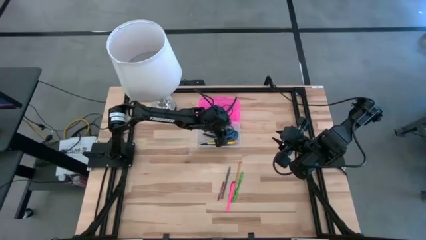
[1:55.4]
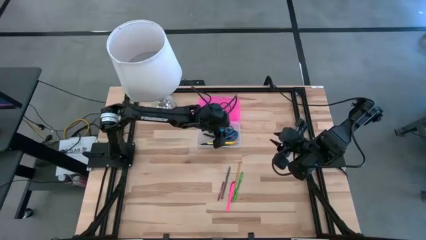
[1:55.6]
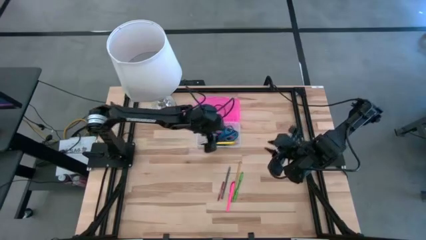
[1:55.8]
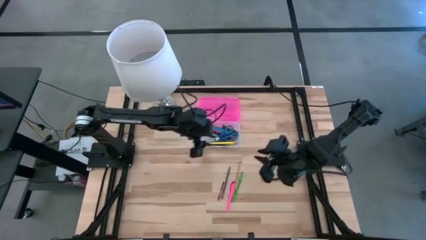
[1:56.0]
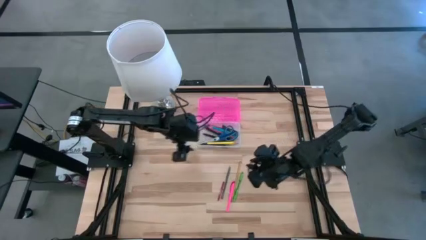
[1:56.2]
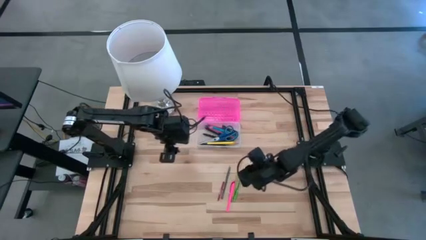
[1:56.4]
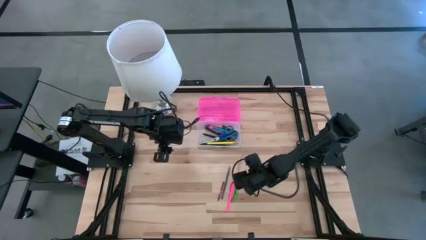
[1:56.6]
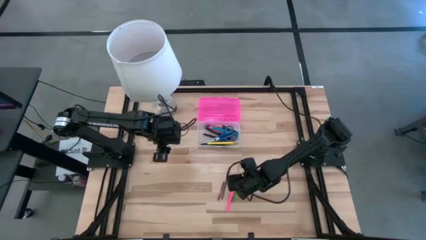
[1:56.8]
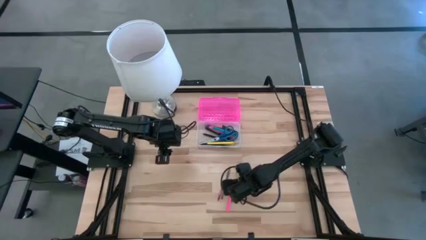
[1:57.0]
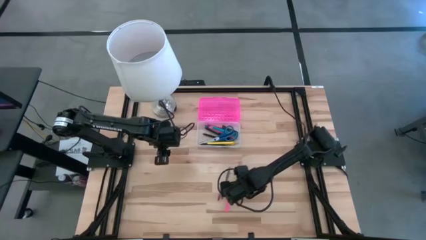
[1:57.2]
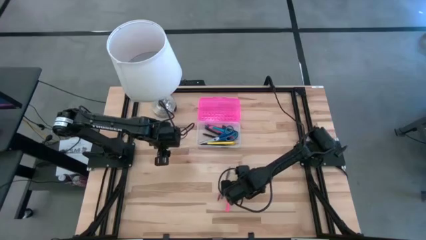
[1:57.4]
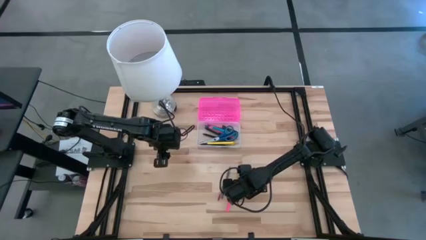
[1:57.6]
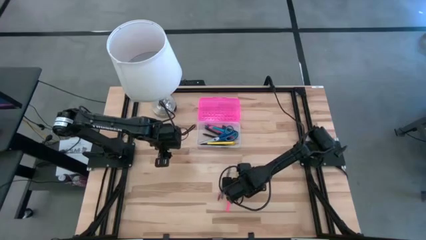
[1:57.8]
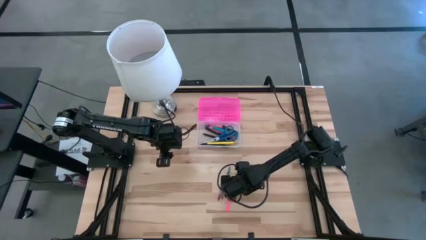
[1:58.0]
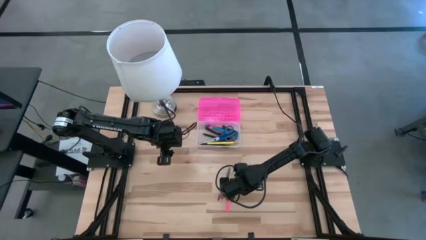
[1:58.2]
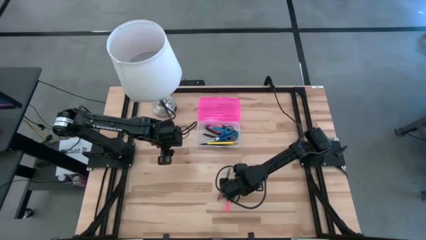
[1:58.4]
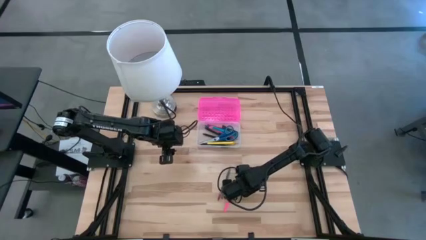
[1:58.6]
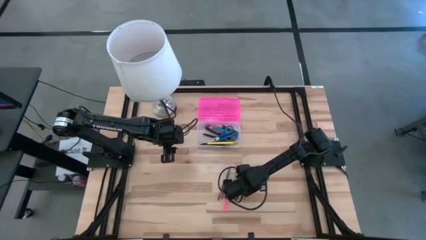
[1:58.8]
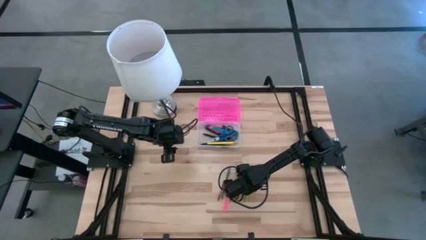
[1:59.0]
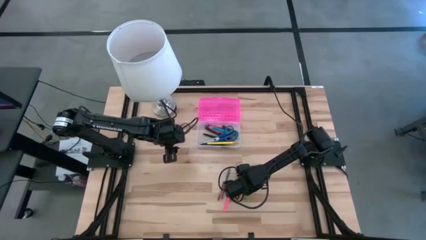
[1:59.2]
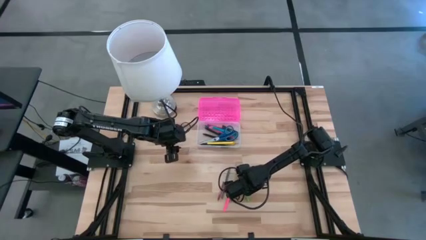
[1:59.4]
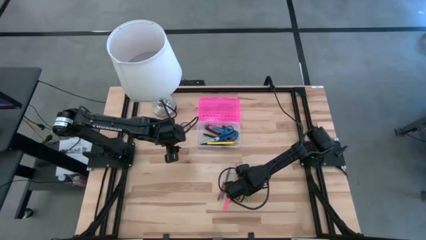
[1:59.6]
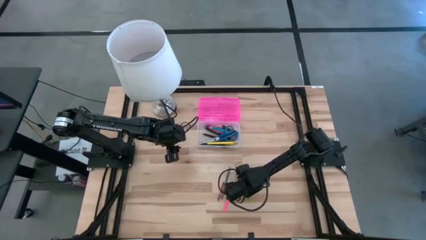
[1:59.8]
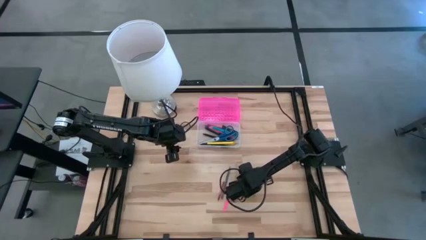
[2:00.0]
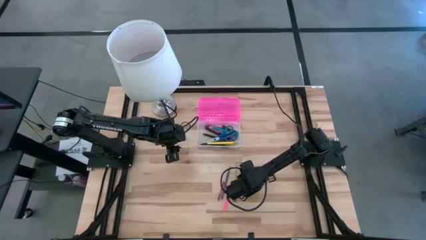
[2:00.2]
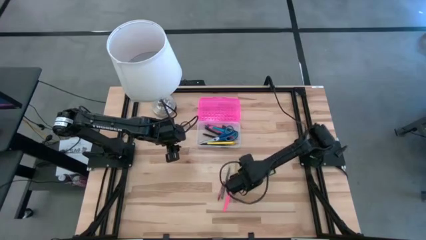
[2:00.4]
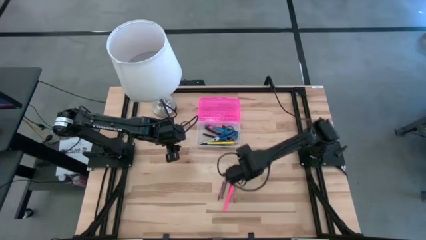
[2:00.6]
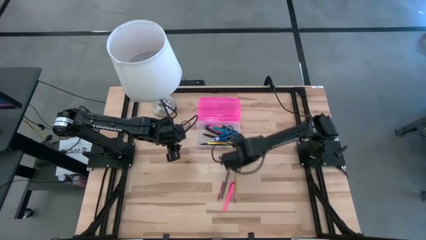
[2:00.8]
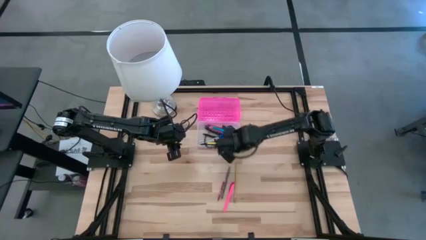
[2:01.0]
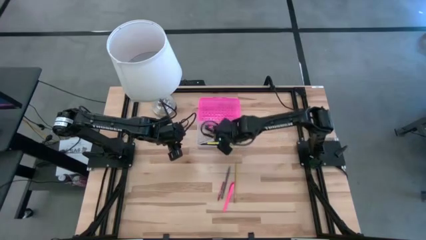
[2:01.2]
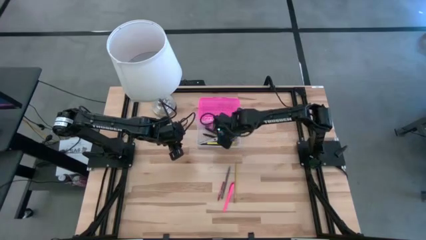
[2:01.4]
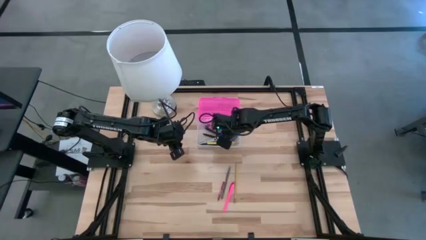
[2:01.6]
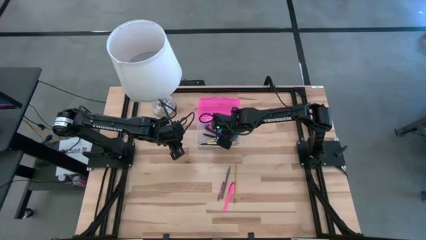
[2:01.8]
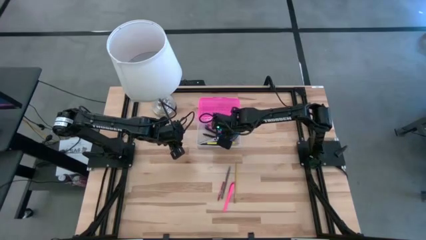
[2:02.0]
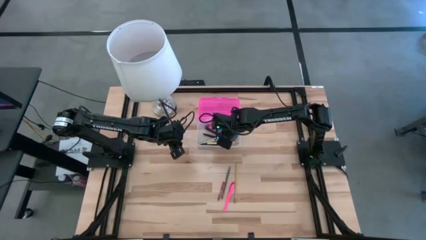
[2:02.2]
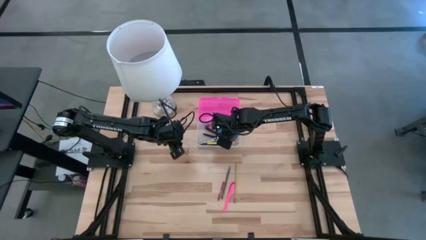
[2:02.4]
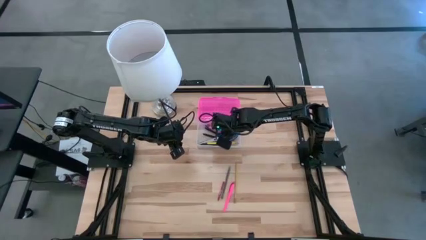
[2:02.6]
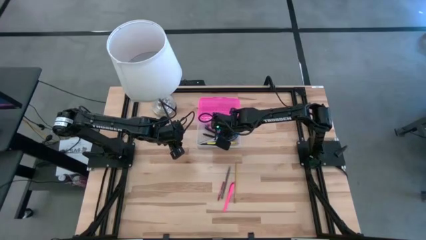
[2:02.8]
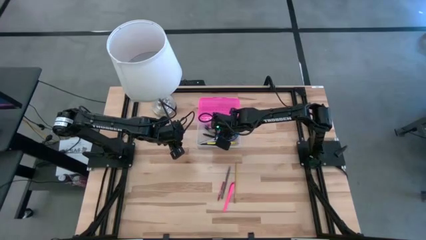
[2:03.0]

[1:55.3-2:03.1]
Task: Pick & place school supplies into a supply box
Put the green pen into the pink supply box

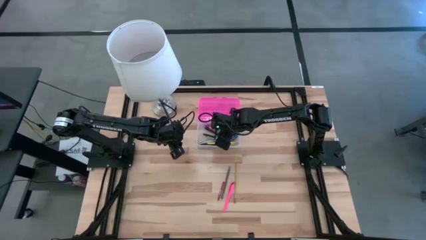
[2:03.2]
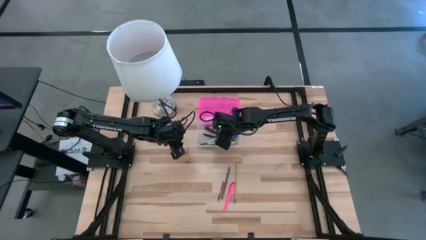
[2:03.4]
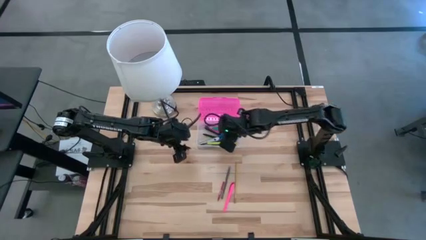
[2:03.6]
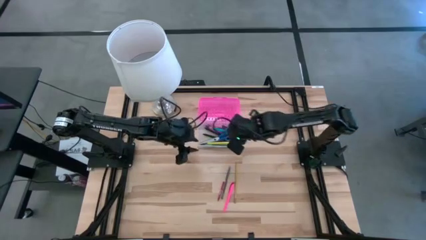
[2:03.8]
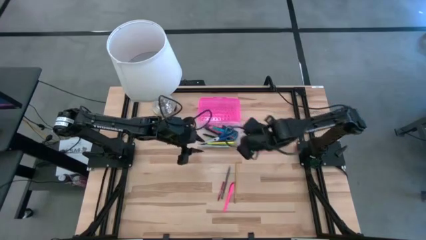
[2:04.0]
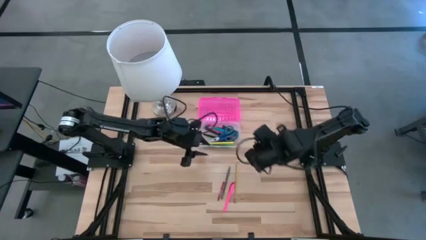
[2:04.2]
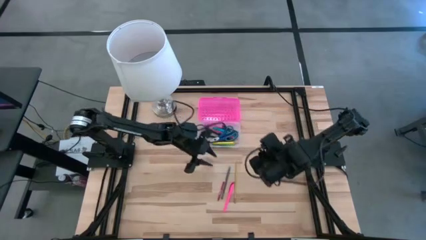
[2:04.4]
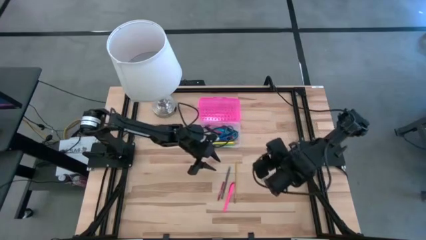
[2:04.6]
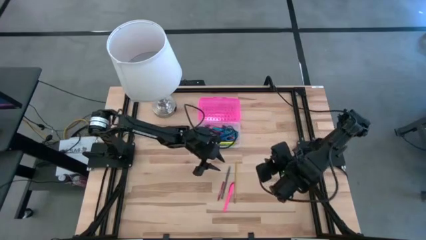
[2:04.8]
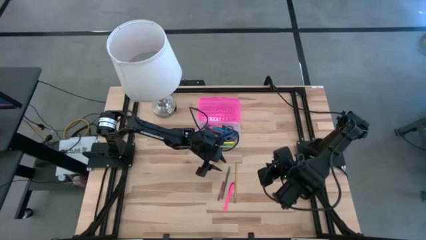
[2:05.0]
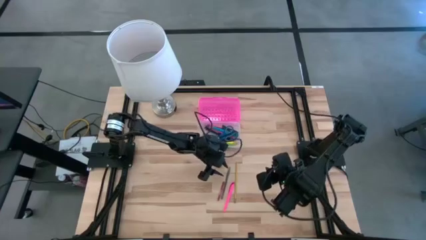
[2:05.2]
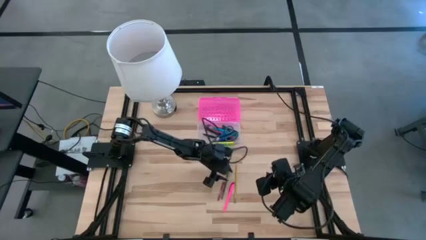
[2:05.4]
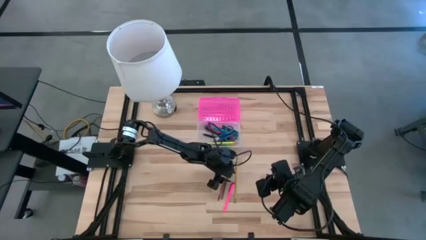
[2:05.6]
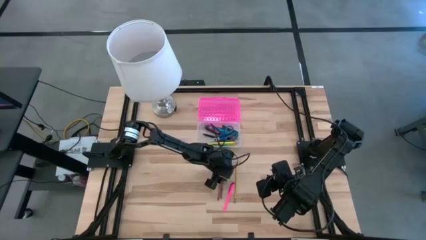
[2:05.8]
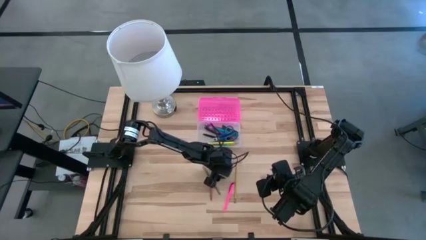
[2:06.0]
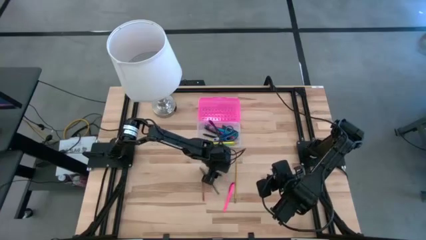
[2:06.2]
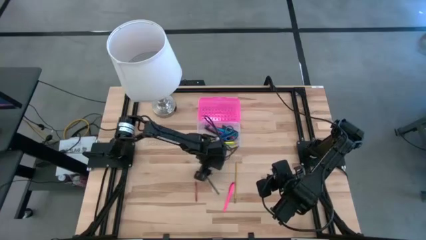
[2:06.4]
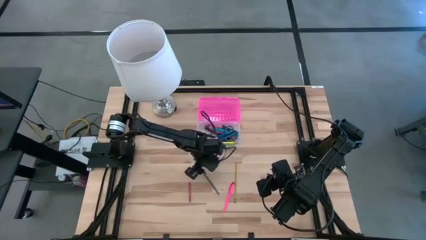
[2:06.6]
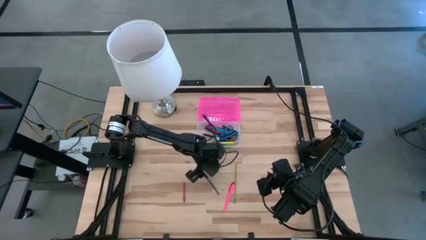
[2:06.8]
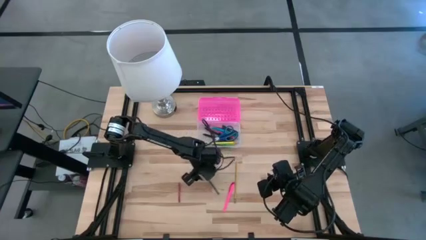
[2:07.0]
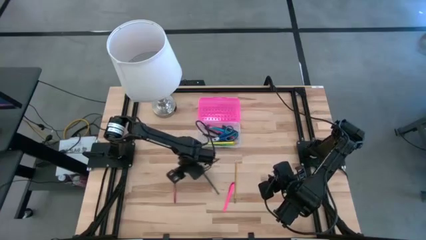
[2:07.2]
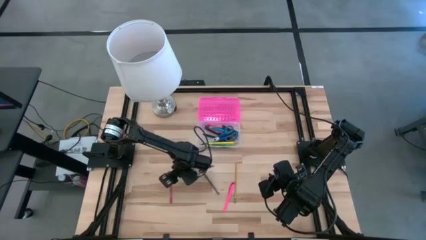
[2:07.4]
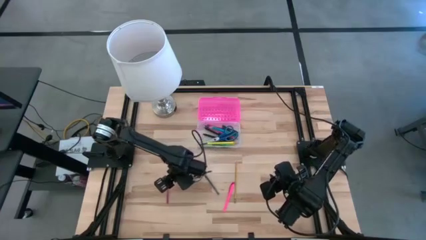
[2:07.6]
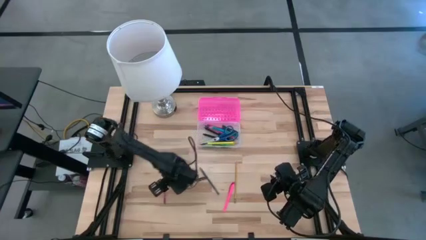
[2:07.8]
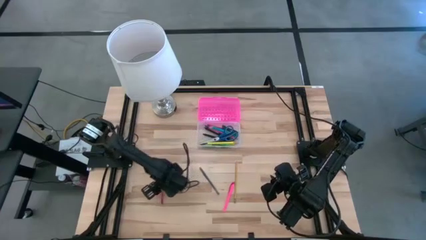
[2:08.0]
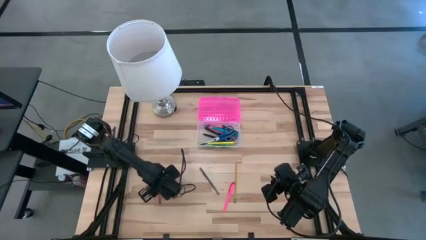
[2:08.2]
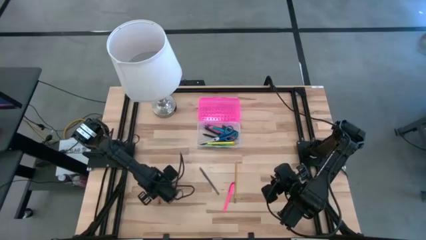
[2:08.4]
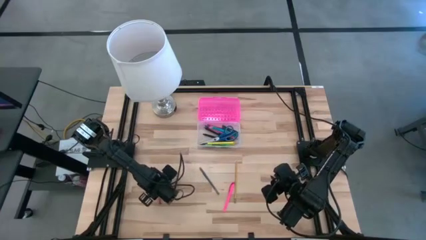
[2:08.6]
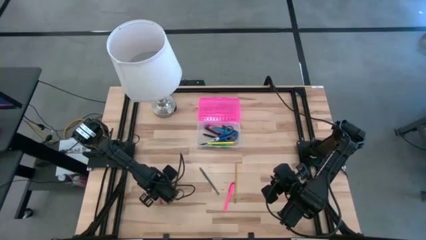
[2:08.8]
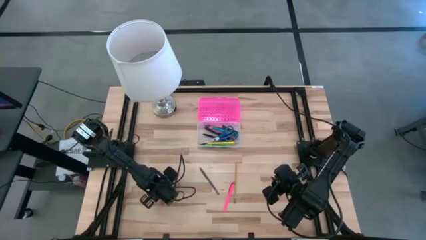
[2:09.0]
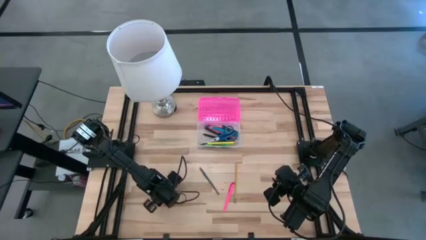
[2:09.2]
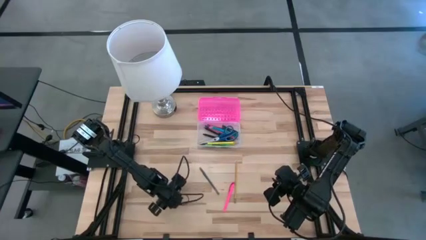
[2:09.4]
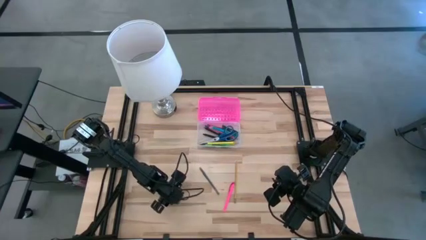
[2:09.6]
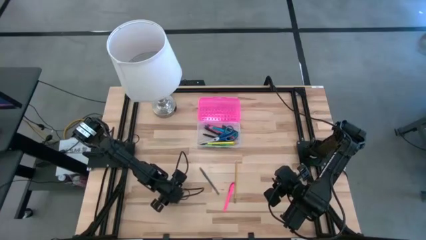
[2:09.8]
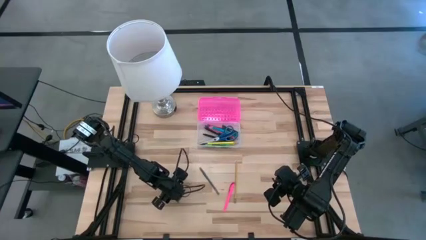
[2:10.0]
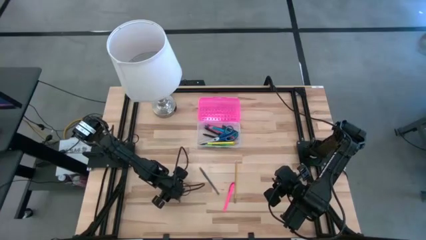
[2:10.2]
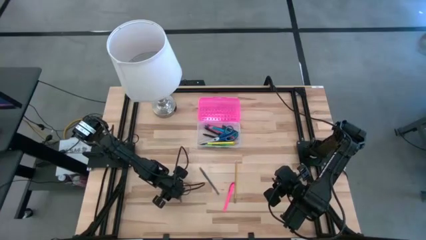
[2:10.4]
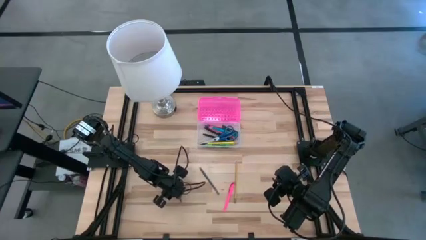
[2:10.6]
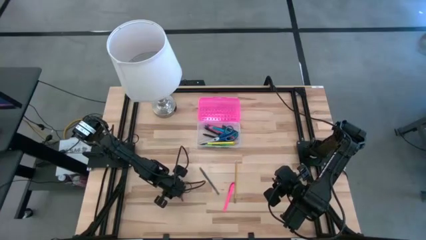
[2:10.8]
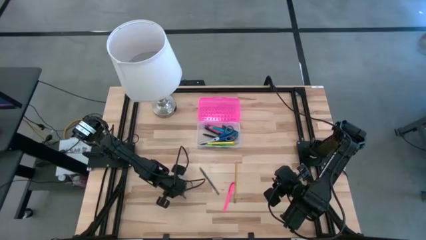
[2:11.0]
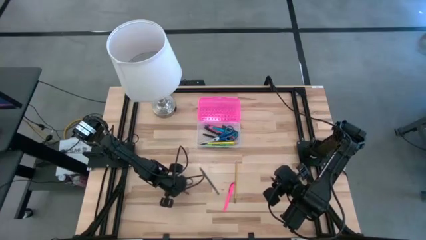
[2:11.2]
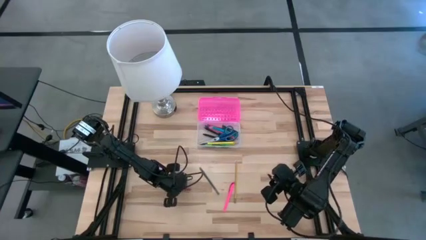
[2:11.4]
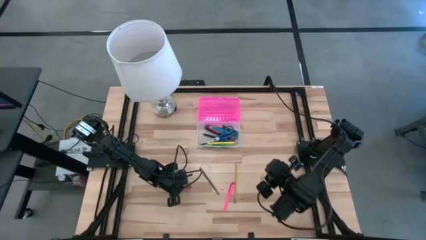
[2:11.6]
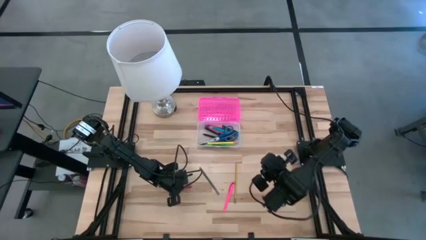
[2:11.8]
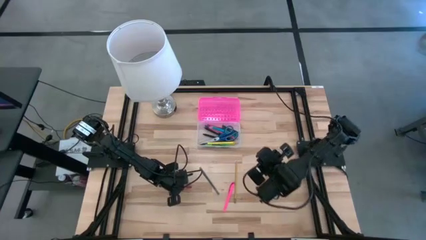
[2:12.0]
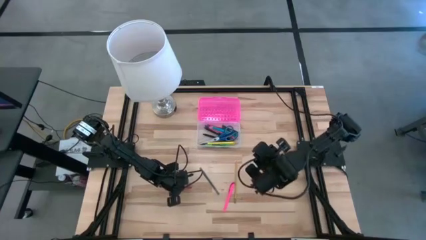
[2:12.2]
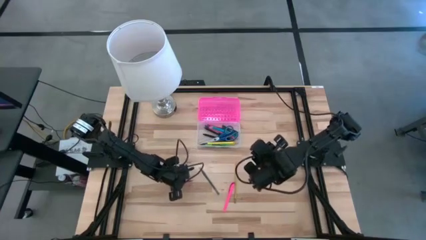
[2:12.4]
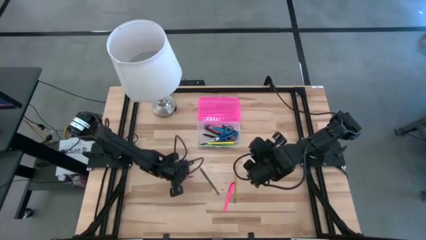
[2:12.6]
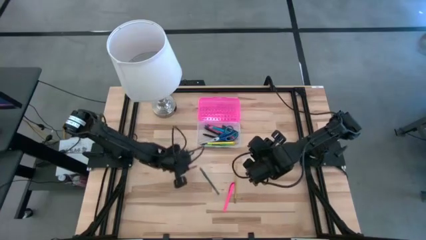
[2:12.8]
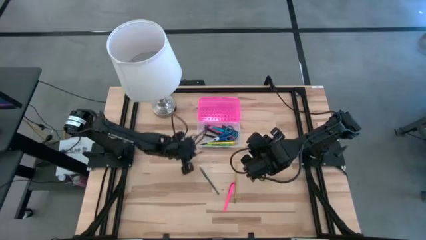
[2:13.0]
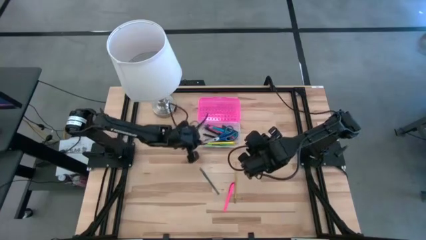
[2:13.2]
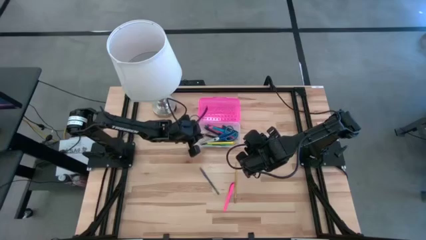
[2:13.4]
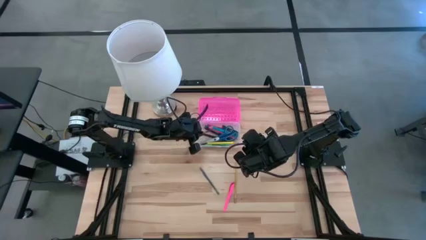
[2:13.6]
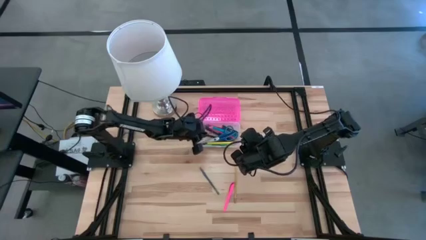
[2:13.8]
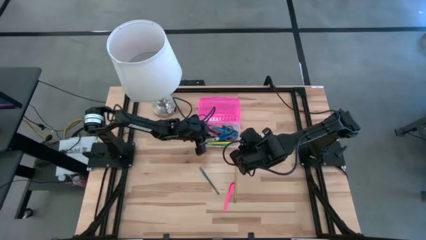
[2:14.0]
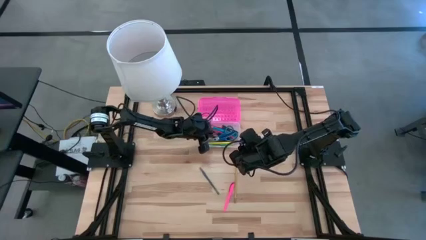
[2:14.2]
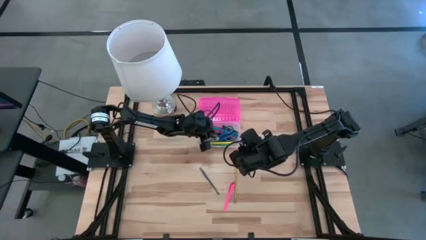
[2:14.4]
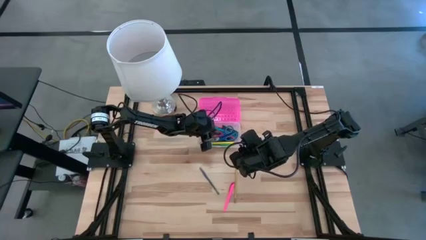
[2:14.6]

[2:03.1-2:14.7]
Put the red crayon into the pink supply box
